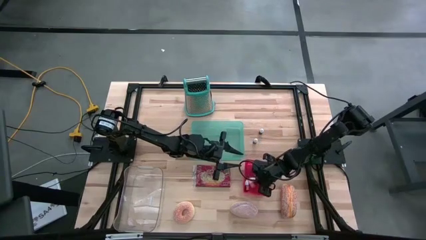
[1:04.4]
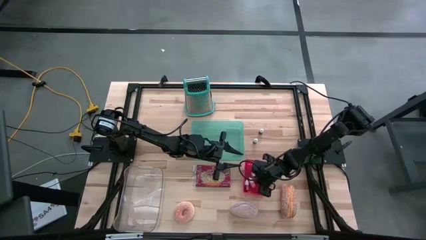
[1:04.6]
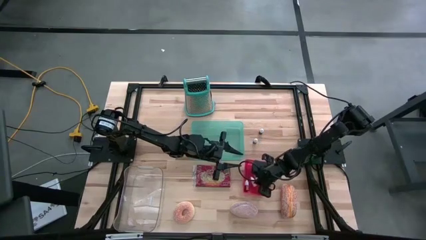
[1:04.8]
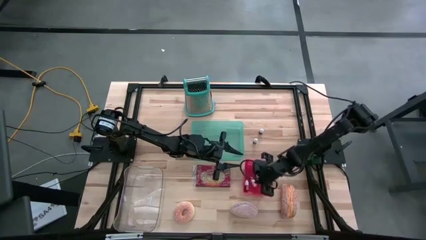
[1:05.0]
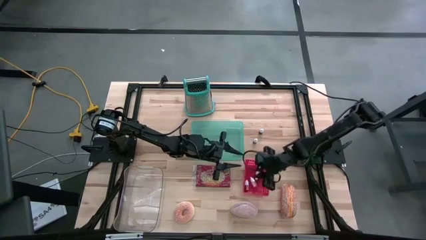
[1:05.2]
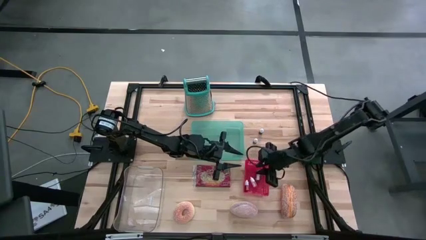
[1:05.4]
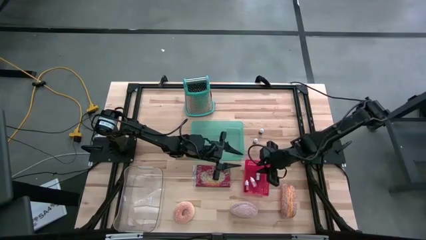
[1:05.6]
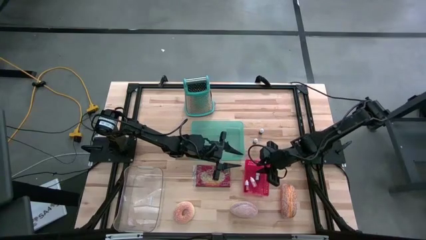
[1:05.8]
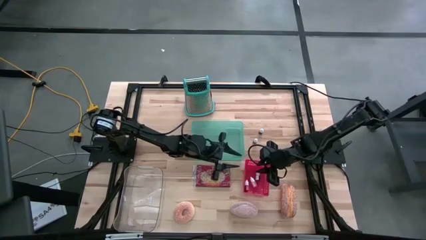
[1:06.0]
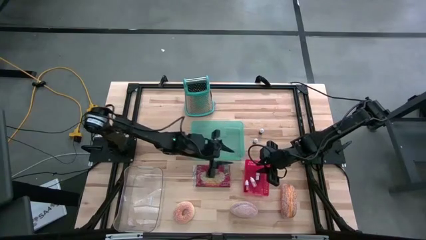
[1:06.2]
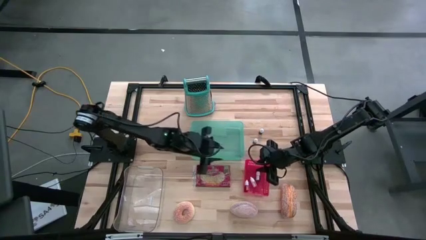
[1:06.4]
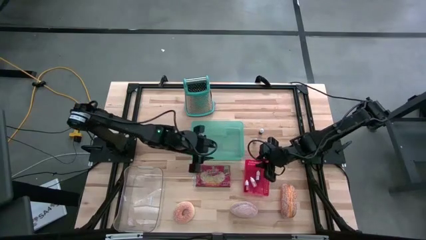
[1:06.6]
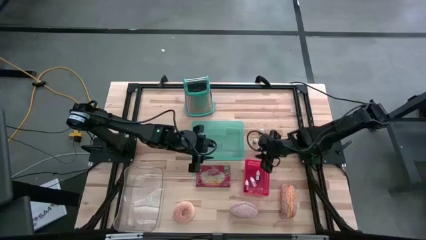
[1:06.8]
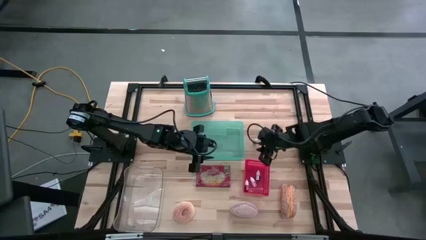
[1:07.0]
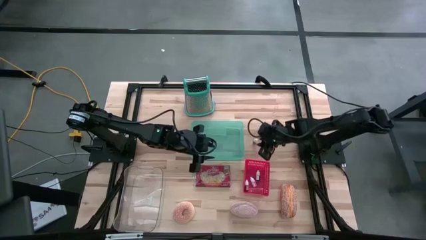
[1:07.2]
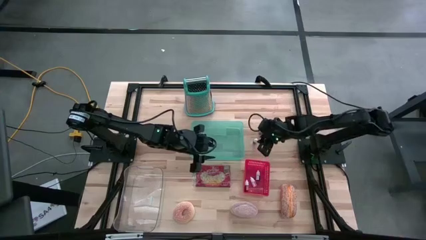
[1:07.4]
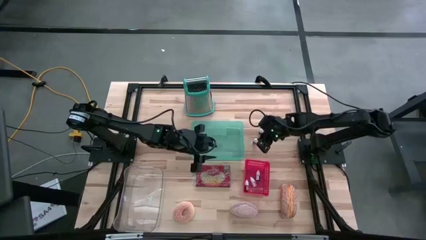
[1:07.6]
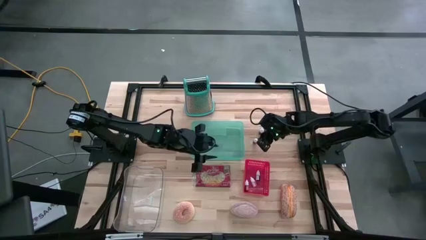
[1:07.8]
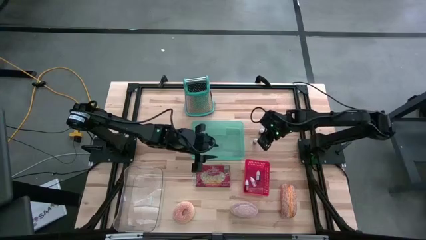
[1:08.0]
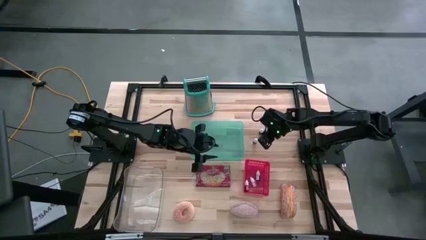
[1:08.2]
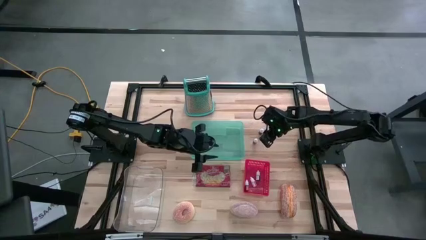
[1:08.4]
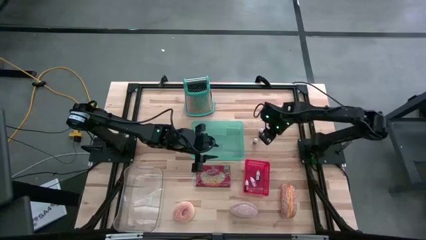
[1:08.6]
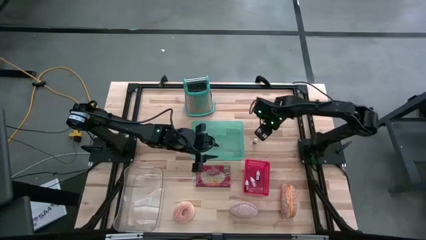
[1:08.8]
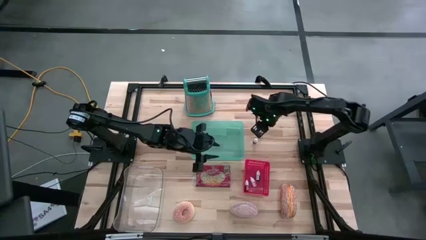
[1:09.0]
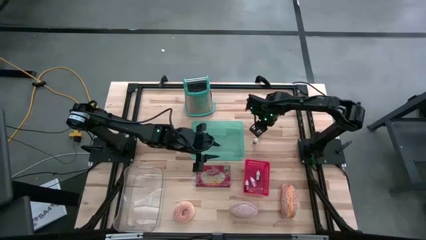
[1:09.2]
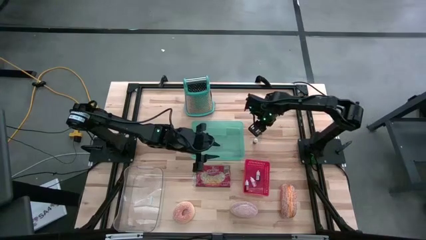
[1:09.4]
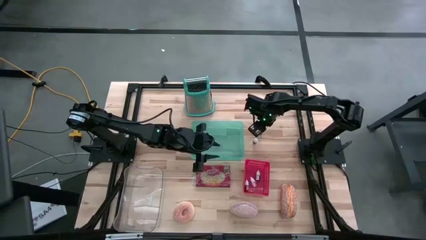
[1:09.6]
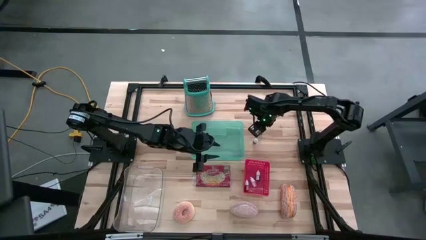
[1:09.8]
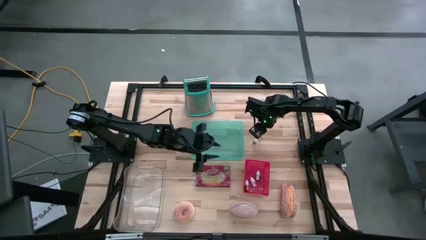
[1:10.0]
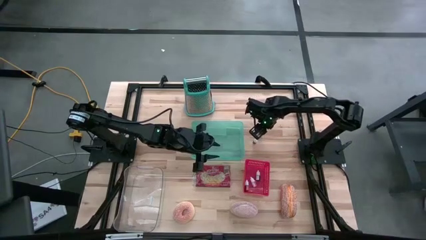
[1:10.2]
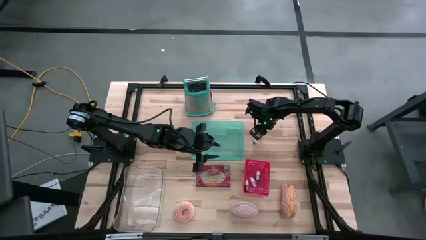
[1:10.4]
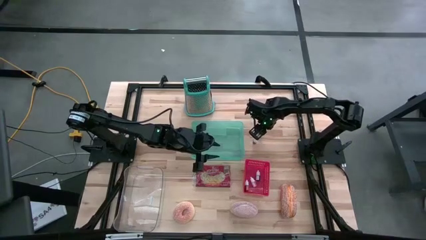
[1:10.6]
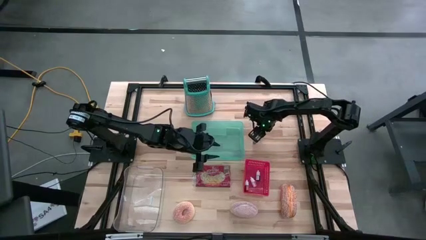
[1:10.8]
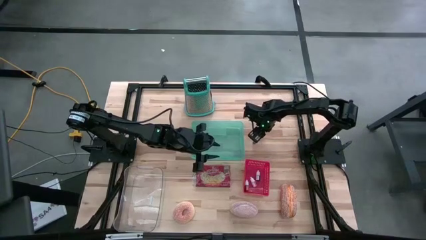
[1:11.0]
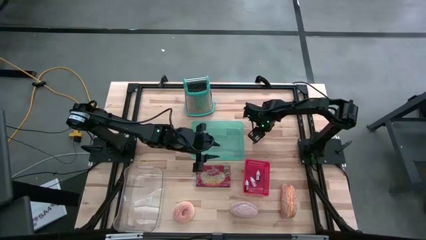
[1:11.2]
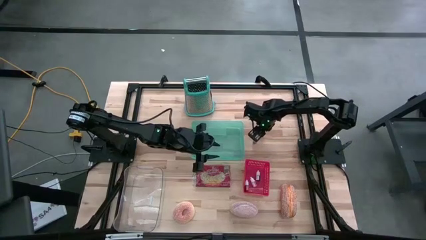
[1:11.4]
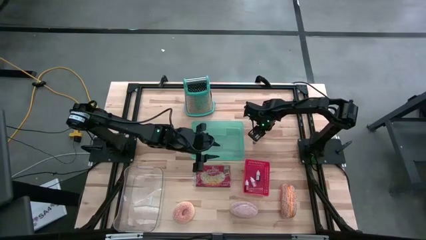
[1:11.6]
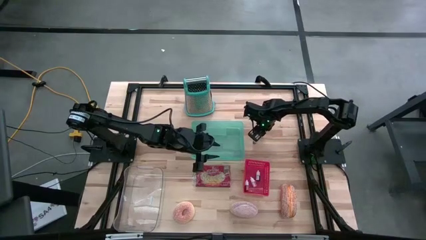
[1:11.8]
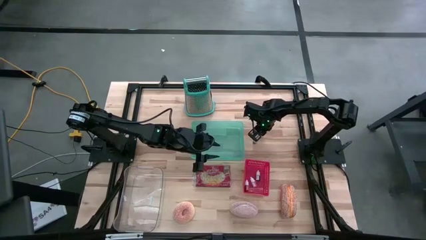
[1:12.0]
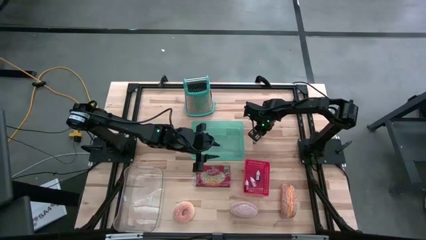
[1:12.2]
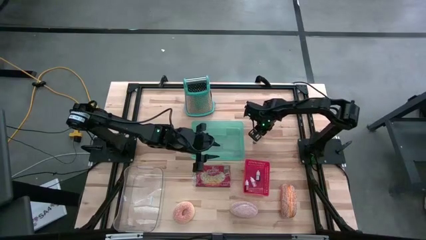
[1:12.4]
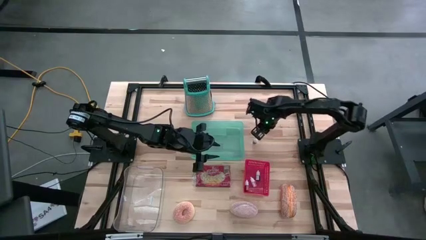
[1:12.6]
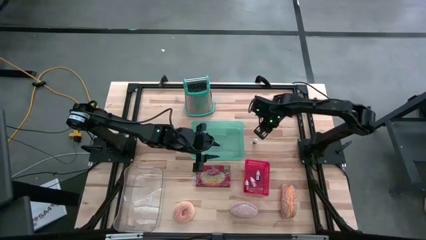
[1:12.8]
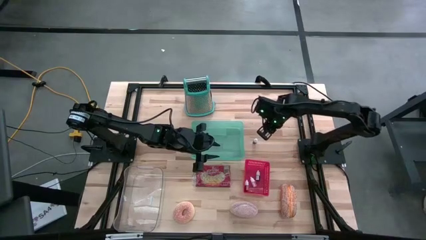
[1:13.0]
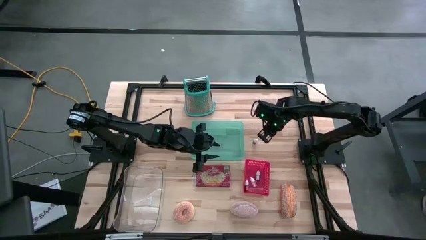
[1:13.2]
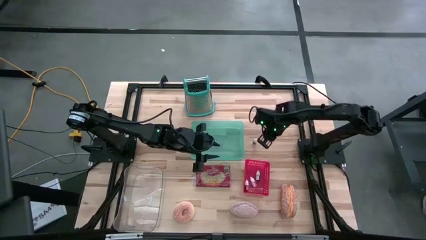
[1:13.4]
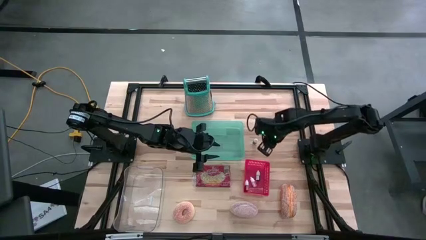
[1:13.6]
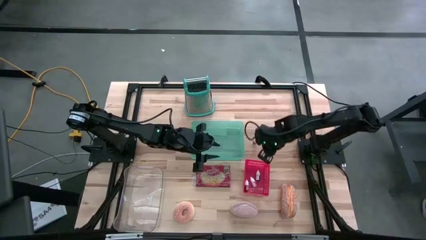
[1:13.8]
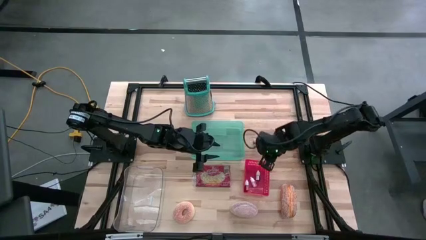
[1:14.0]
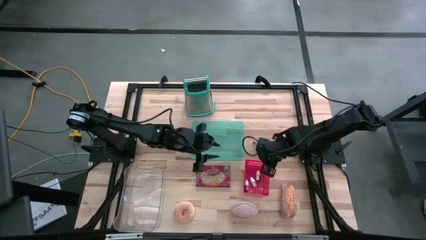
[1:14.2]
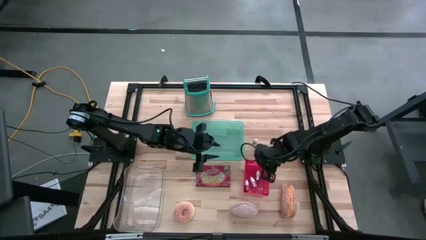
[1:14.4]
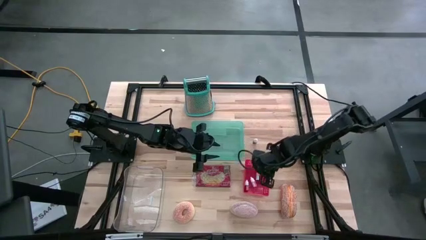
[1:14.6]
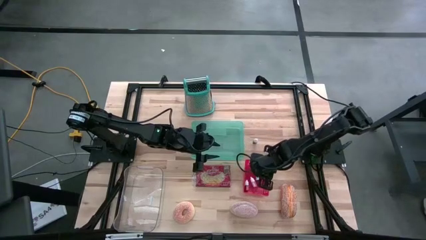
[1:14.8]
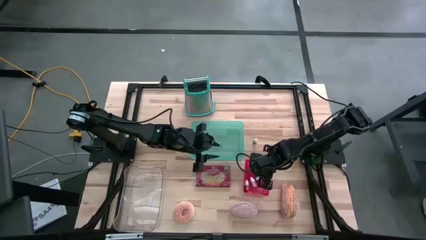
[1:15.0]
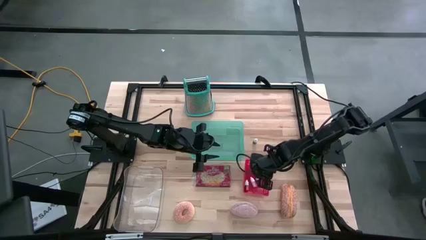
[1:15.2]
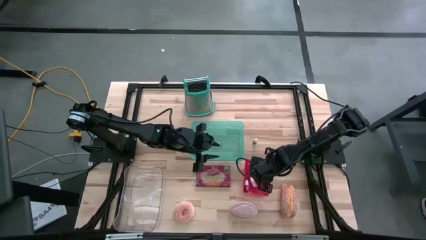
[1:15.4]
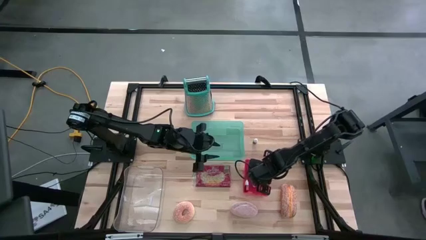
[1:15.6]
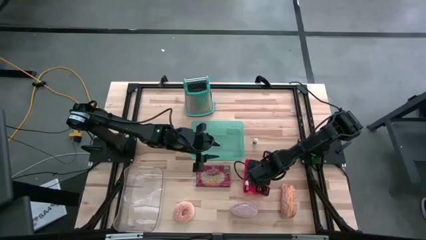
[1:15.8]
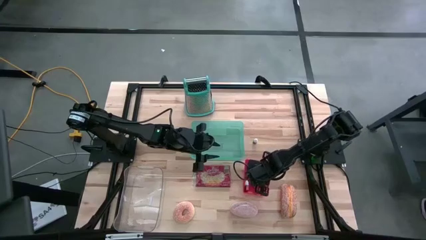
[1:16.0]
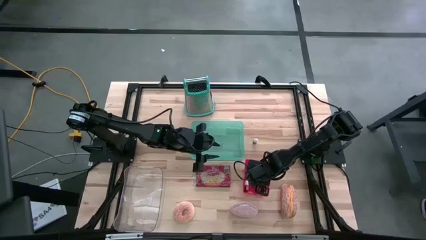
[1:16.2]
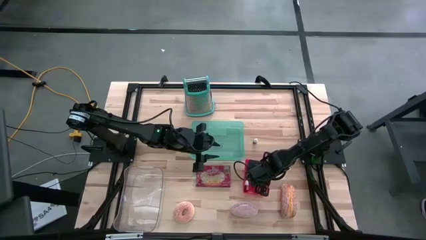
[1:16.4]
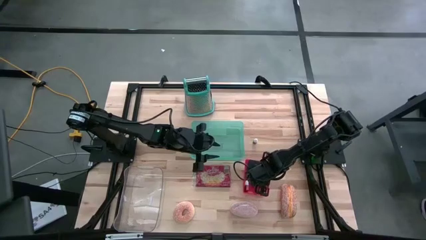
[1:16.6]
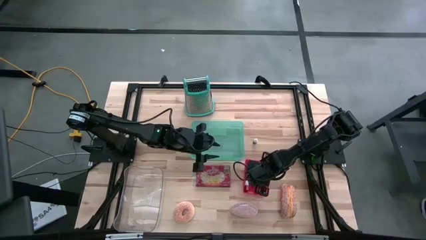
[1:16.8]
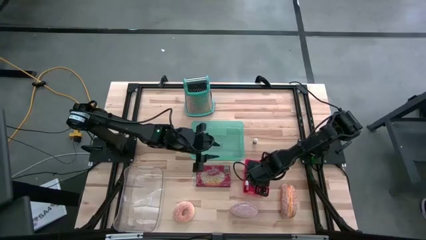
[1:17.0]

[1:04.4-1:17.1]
Task: Pick & Place Food Item
Put the top red food coloring bottle into the red bin

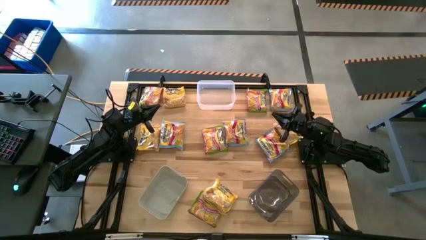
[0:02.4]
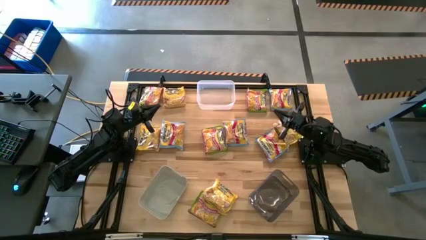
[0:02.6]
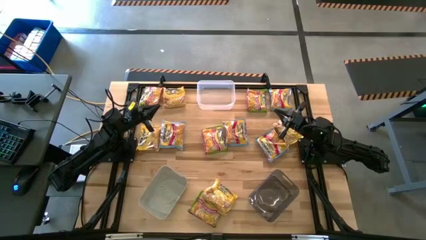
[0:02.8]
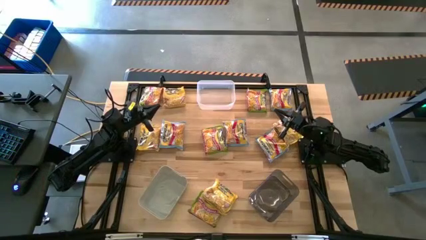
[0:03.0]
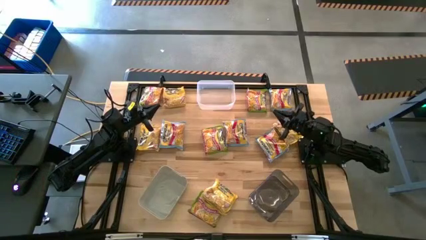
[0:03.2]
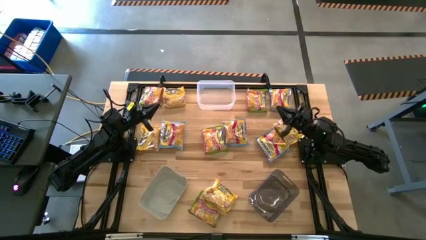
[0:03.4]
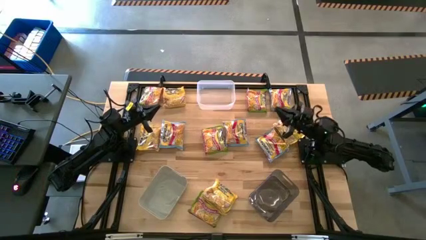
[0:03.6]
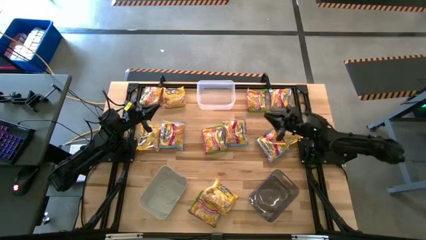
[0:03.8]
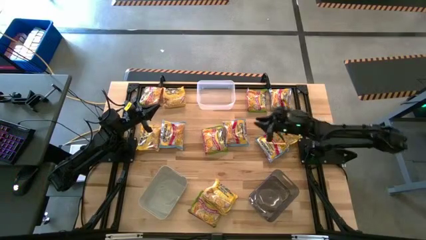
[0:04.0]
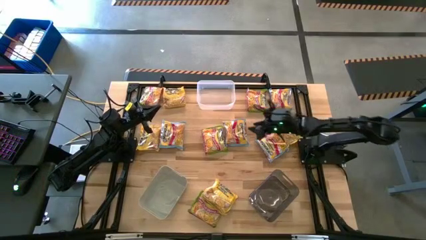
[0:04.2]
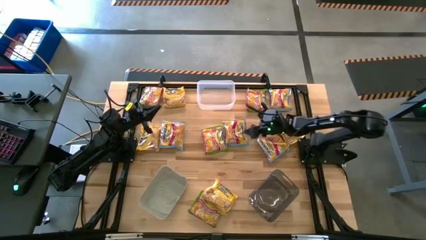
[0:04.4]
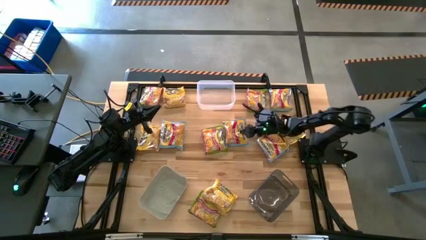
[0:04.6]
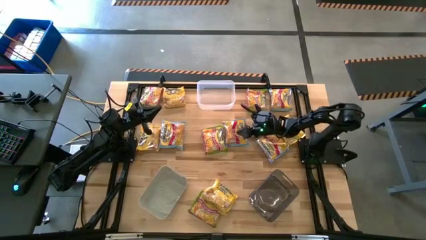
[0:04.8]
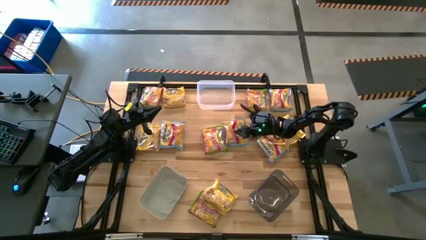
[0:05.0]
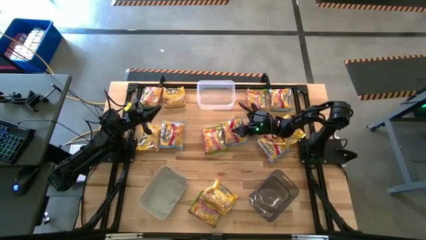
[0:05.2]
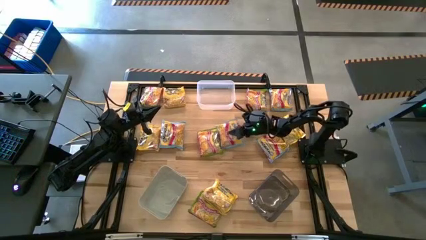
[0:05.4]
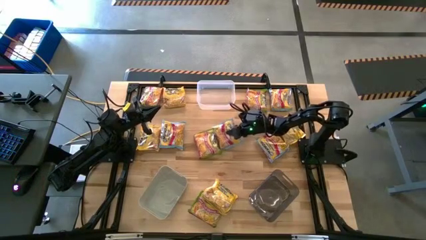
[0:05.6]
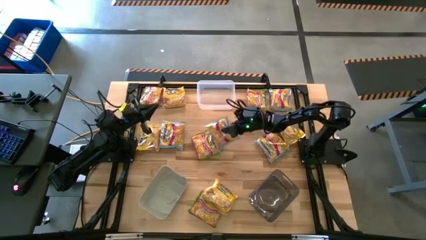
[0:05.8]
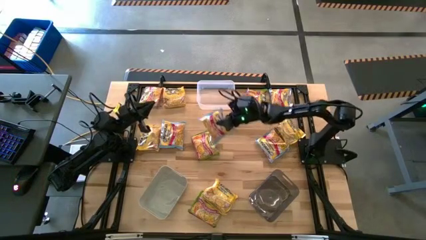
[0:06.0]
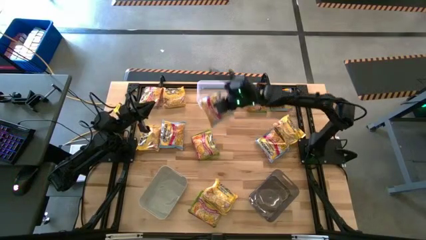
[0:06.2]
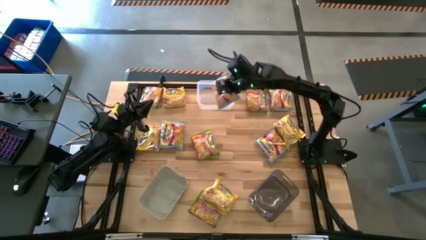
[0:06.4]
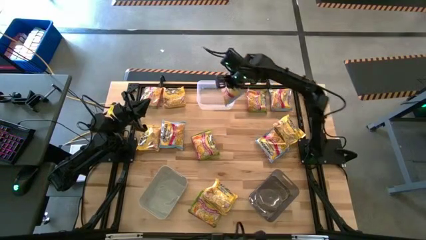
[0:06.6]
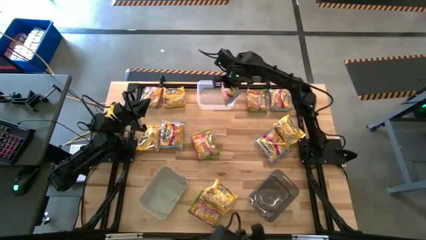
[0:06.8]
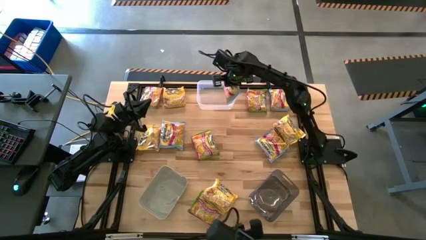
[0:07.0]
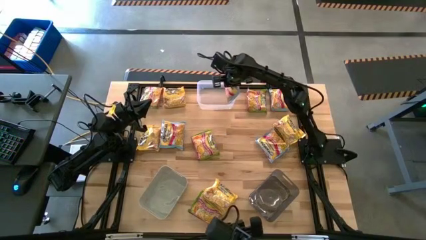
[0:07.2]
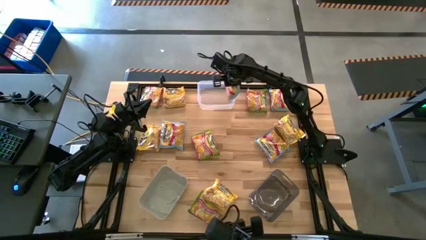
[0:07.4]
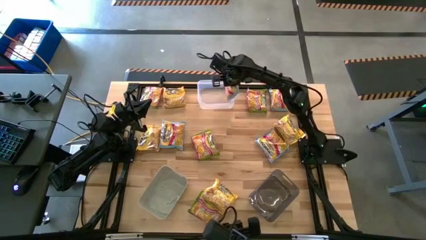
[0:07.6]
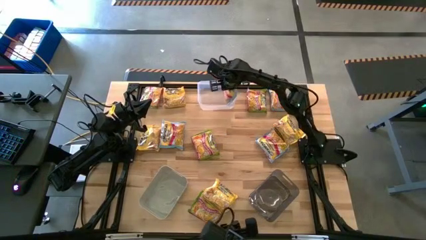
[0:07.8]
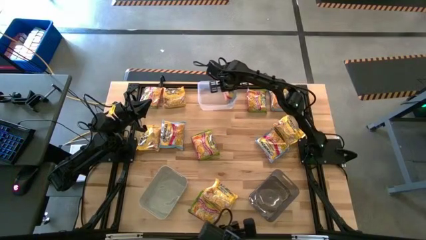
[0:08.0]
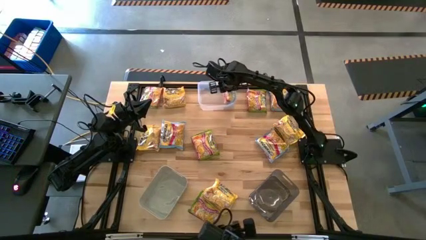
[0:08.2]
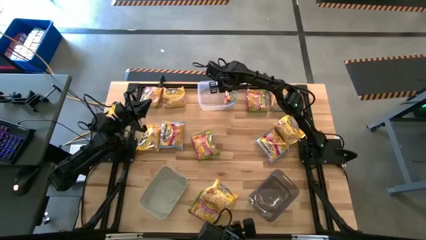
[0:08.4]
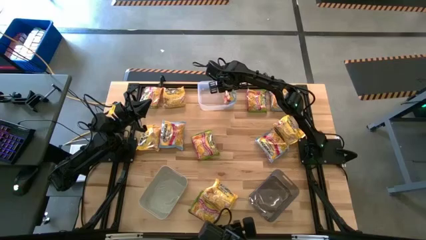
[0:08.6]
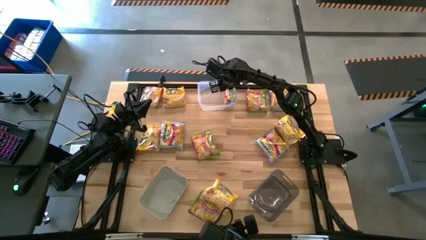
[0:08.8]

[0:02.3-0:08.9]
Task: Sort Maruchan noodles
Put the light blue noodle pack into the transparent bin
